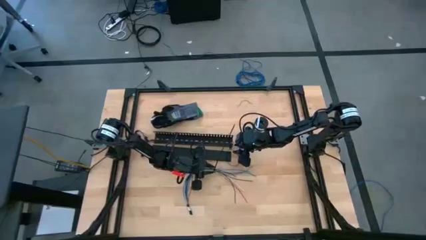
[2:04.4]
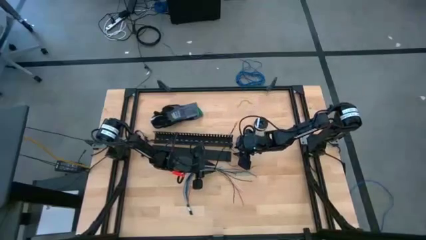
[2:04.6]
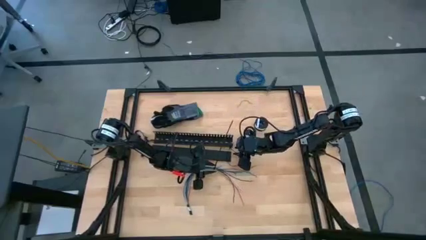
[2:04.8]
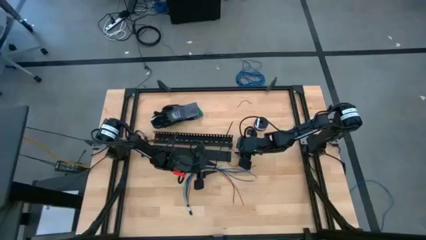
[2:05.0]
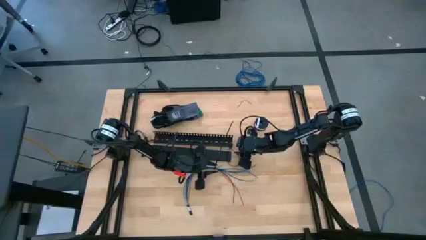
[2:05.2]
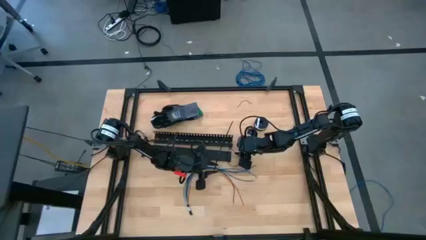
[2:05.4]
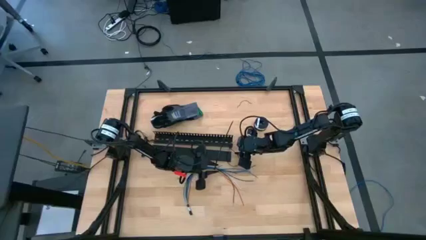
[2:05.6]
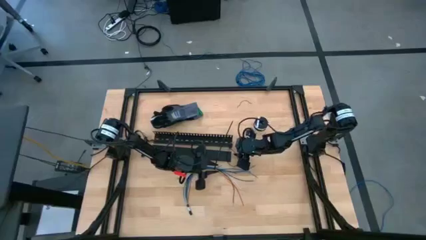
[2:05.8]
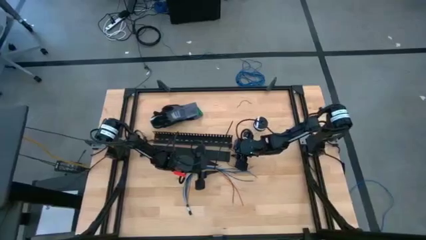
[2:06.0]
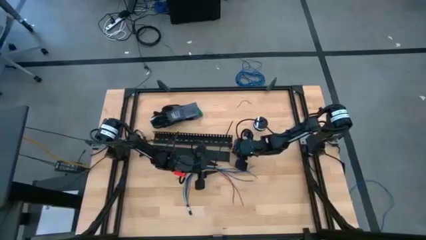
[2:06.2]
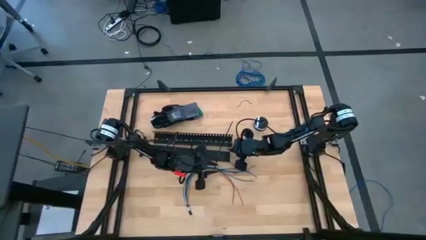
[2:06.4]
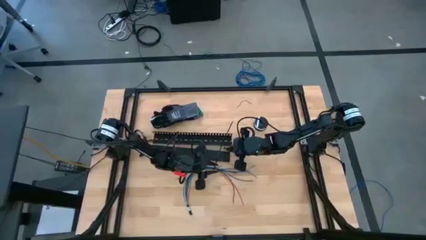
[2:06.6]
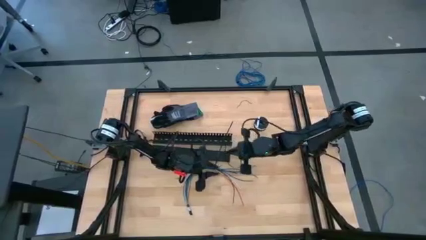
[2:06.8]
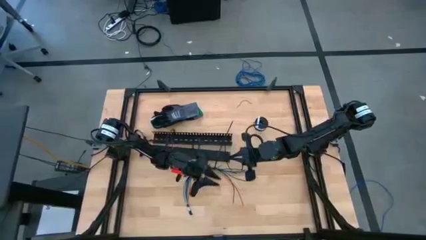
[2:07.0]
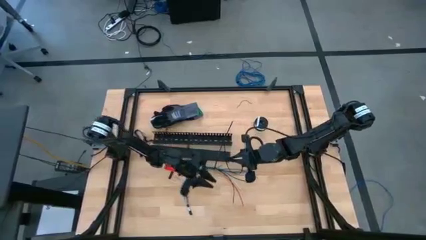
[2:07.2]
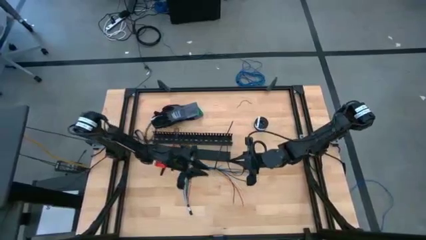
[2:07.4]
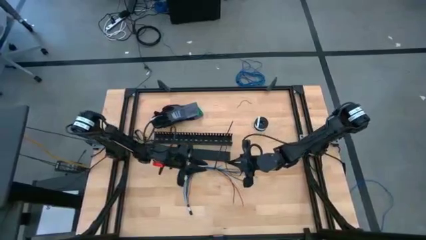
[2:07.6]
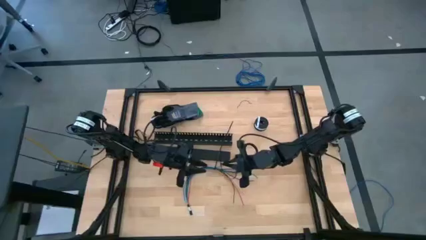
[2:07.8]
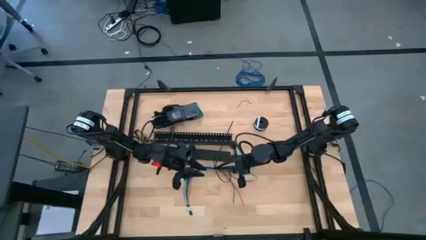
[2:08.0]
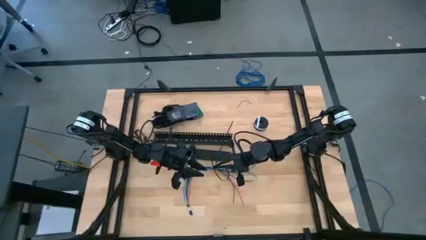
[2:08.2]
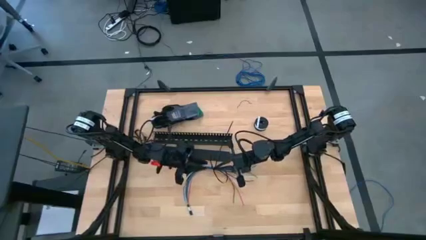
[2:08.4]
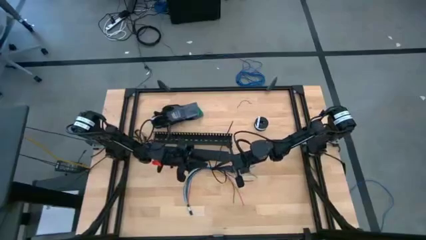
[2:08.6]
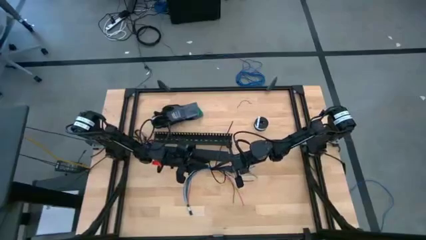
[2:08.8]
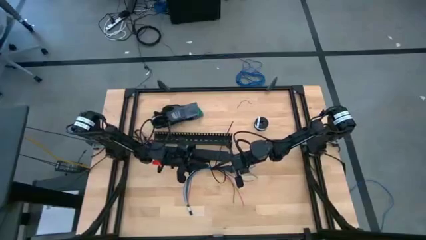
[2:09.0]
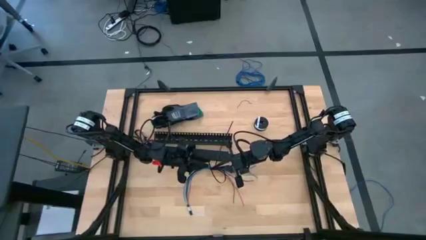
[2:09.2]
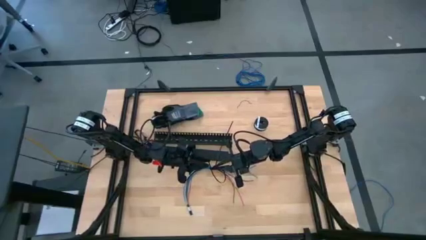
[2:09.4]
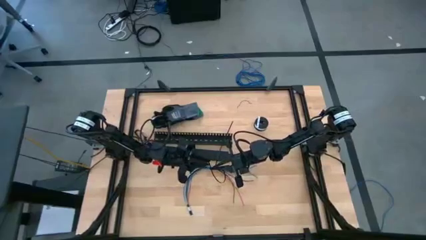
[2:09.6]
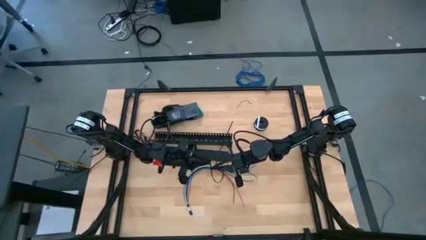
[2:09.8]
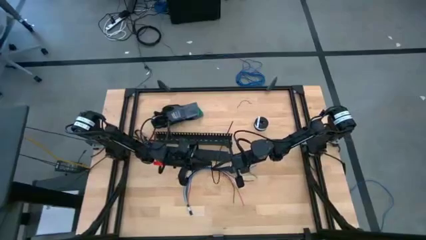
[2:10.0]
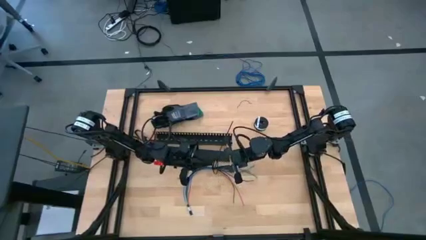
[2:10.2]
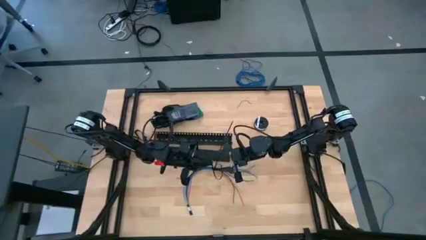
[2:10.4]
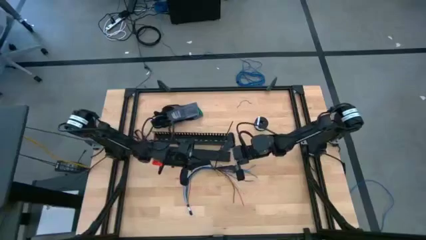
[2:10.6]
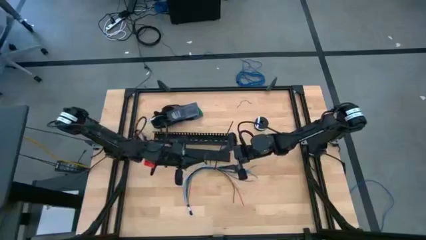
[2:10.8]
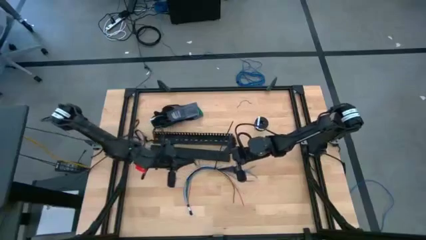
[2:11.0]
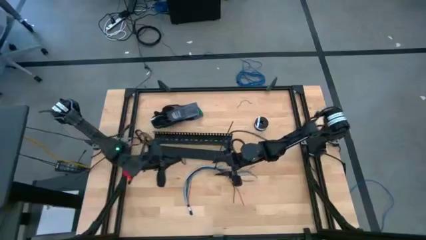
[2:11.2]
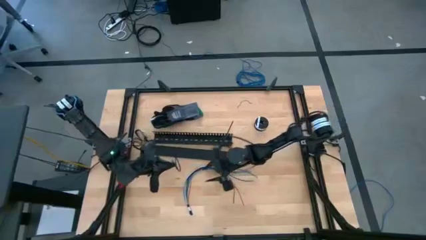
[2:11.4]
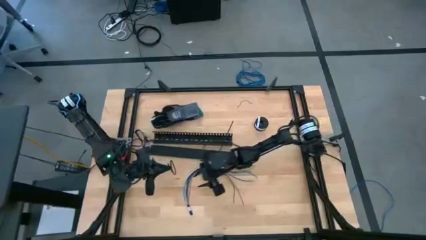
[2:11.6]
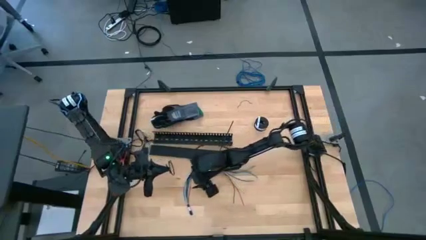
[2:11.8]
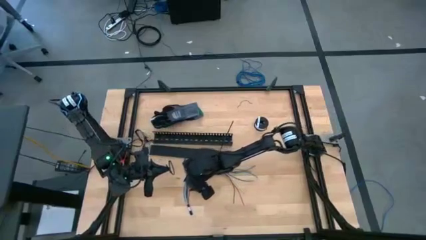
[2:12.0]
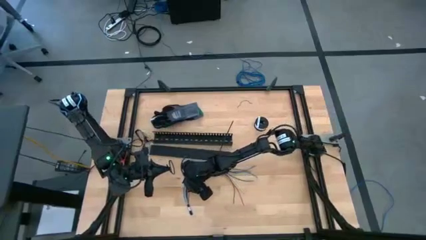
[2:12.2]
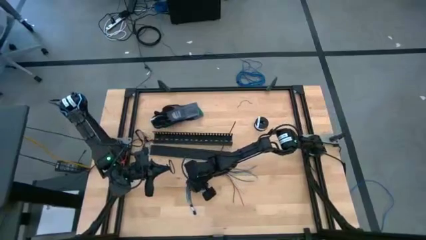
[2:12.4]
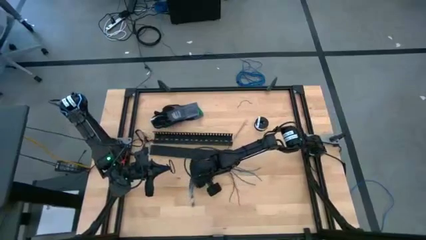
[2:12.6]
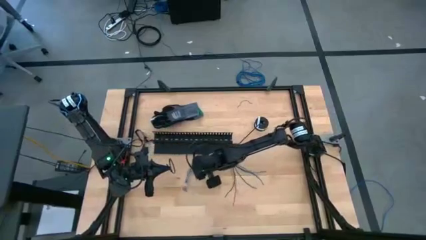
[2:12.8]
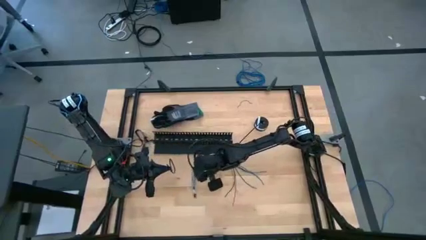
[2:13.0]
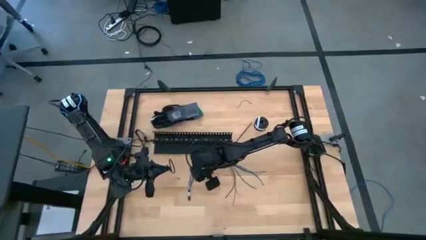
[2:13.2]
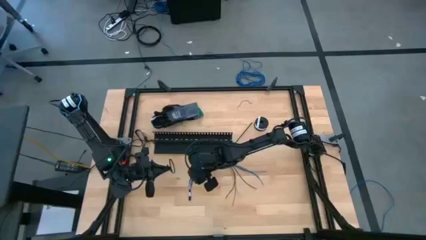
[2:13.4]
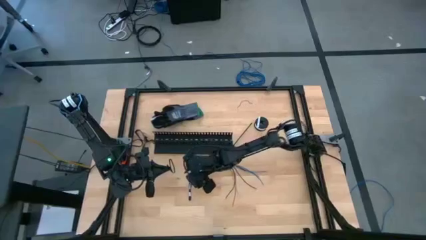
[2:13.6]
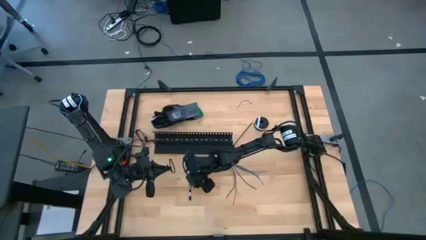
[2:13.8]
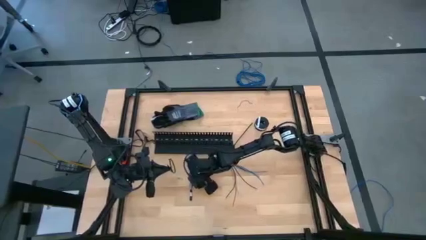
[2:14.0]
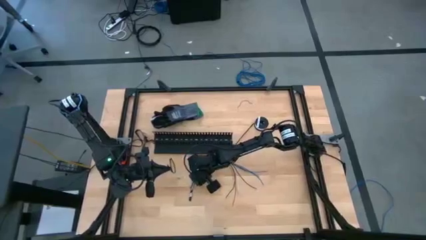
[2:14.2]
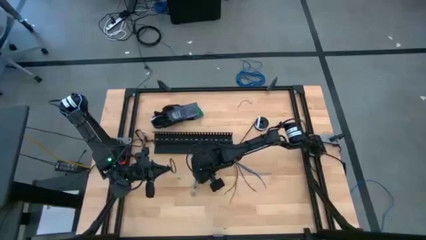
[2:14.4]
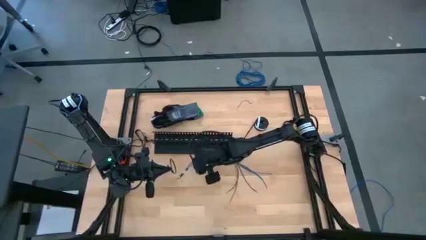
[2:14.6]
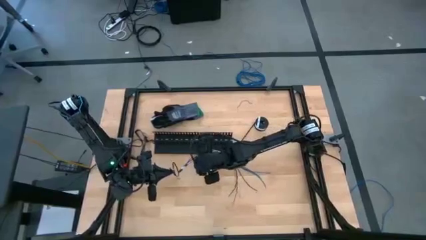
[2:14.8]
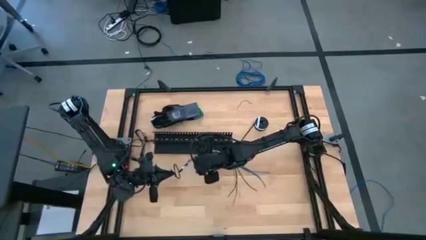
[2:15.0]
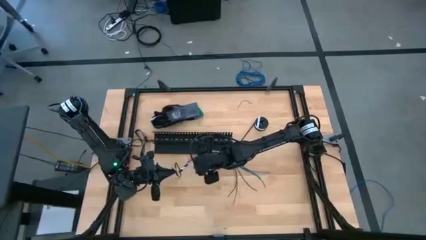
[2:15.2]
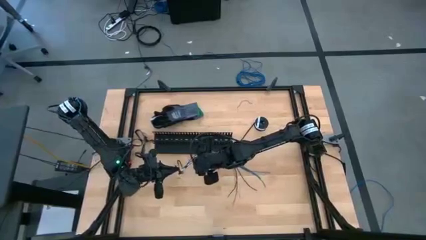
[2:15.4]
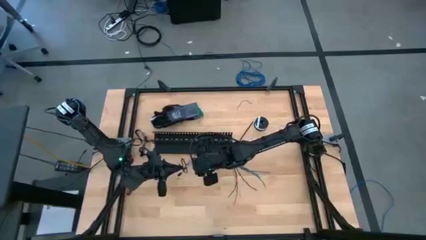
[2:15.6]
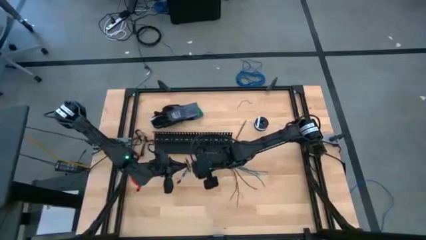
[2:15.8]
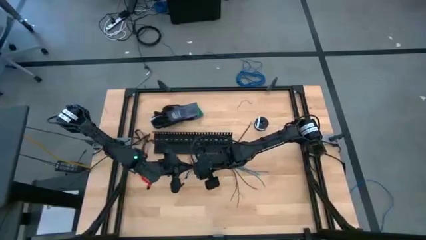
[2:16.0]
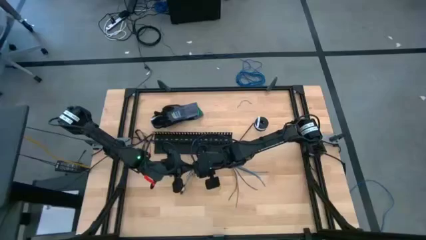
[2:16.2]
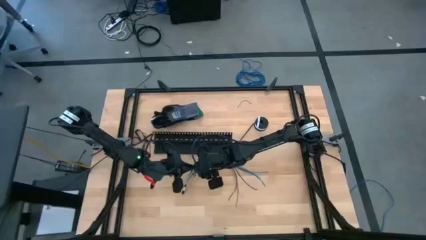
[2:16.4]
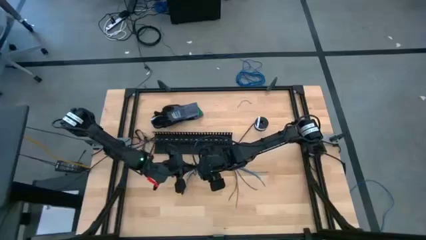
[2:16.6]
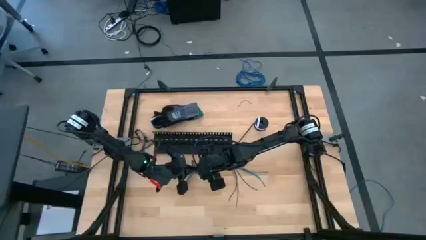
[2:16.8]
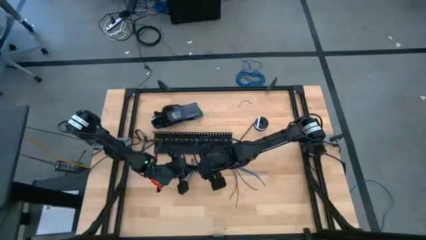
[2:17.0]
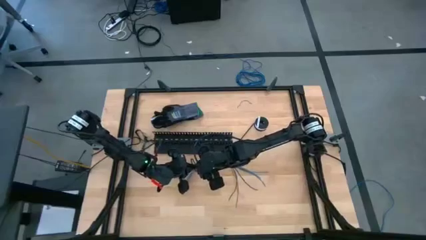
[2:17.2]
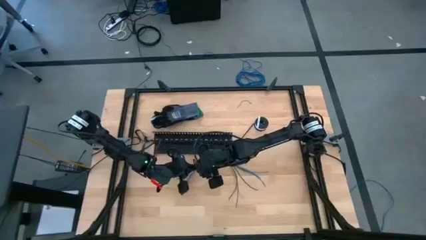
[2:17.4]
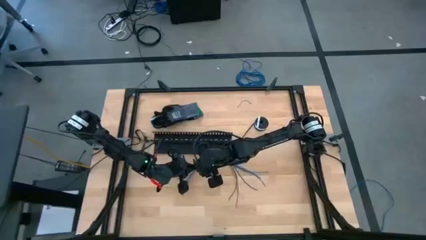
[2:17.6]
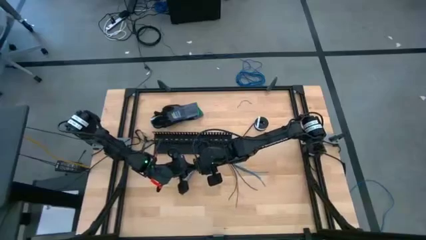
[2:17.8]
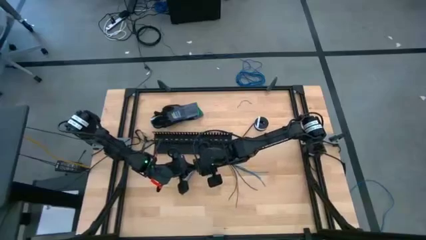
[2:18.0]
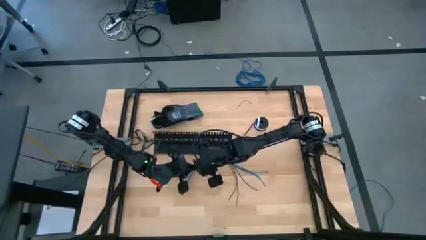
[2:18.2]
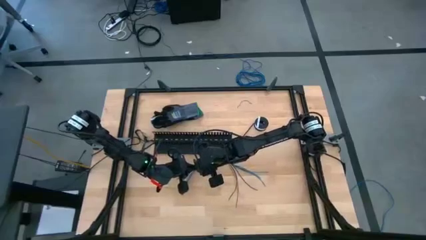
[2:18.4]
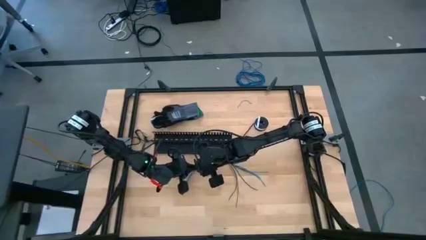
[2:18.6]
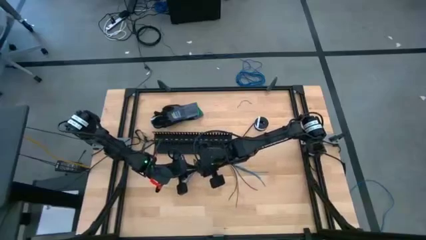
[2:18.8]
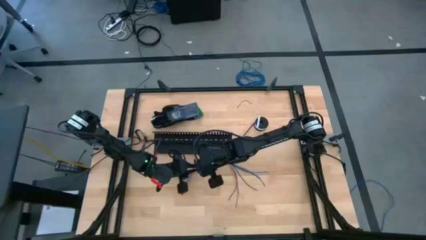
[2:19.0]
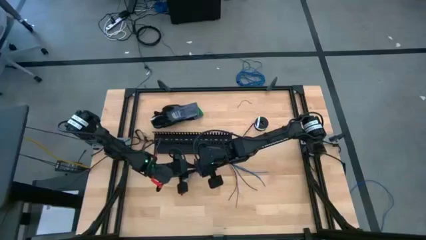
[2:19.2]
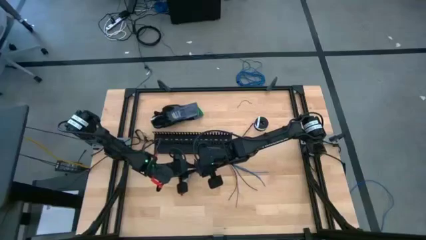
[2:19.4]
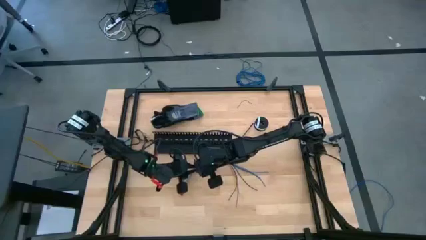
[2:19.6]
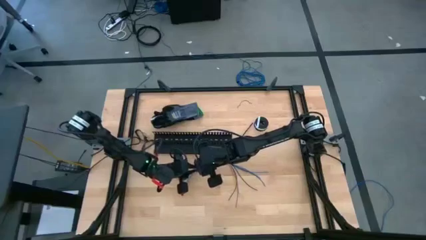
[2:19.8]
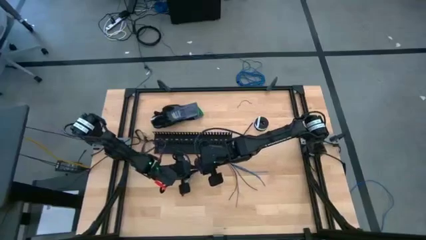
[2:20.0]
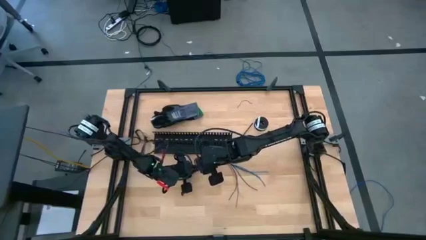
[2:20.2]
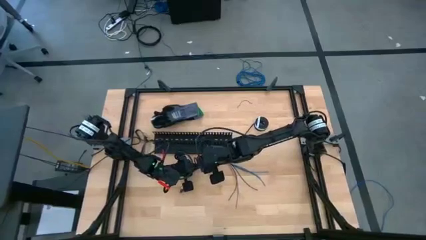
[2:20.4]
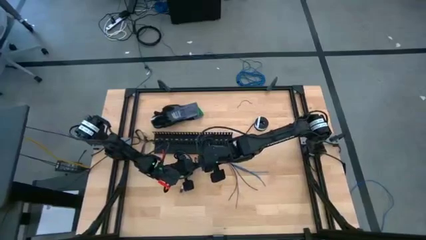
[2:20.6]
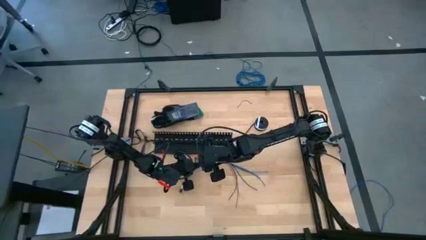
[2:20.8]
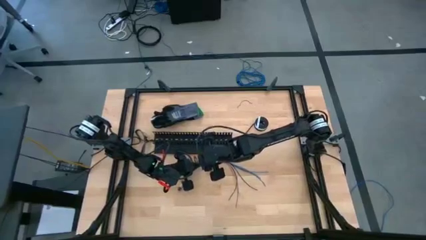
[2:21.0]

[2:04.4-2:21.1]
Task: Ziptie cables
Wrap the black zip tie on the cables

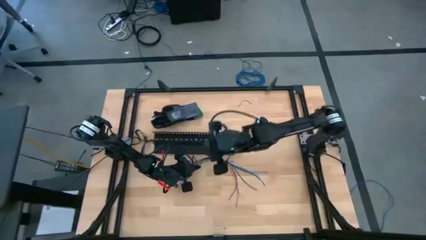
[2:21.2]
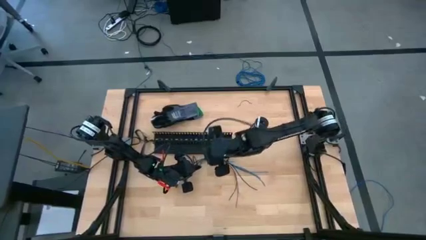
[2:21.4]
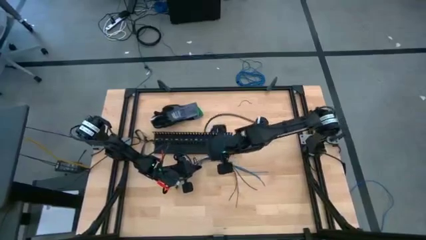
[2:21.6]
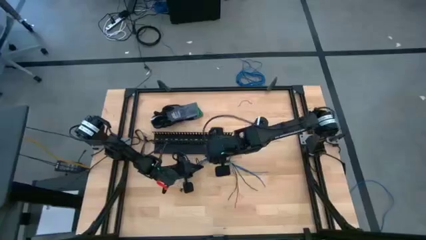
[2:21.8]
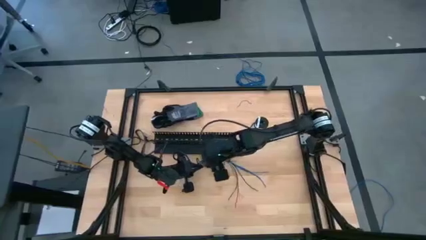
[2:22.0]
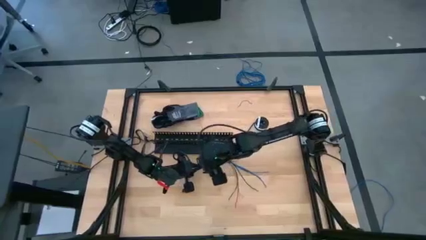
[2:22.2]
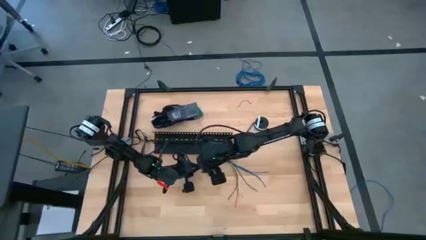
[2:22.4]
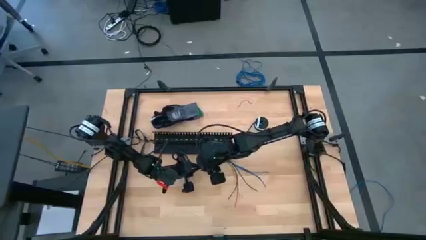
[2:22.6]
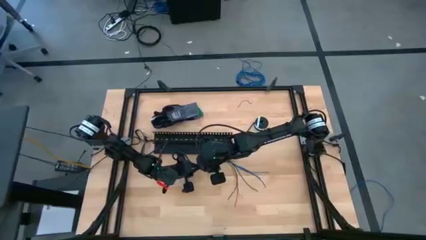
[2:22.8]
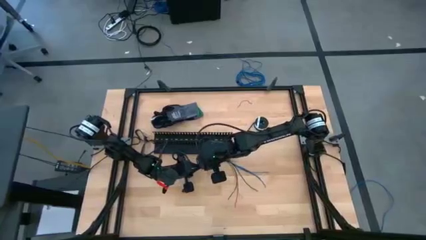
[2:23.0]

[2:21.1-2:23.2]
Wrap the black zip tie on the cables
